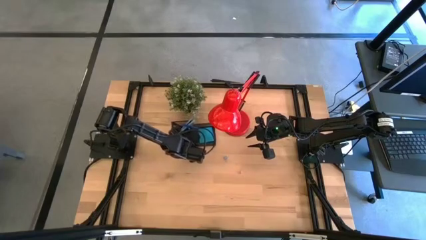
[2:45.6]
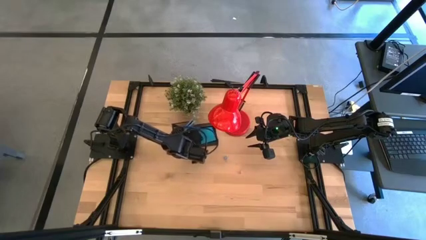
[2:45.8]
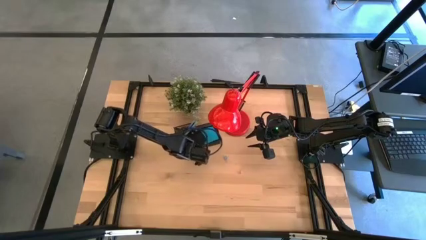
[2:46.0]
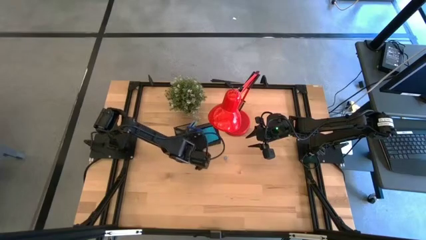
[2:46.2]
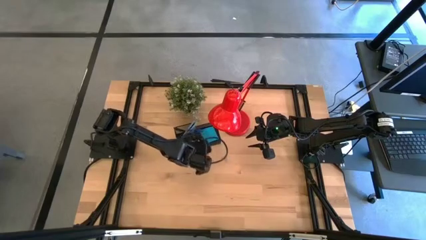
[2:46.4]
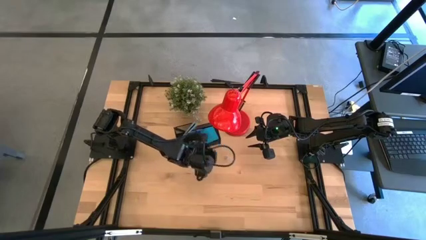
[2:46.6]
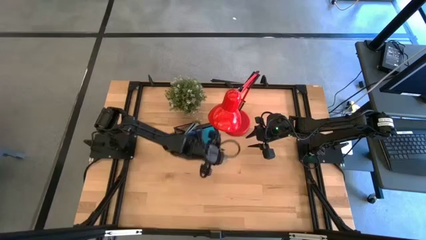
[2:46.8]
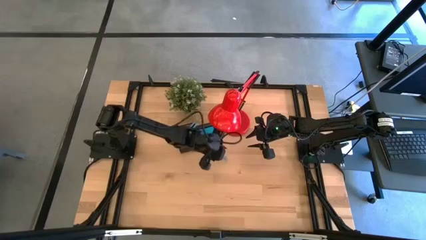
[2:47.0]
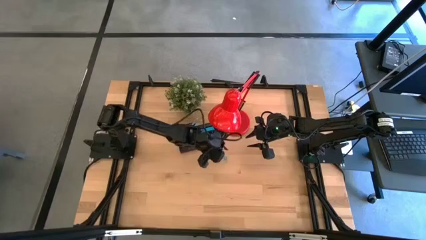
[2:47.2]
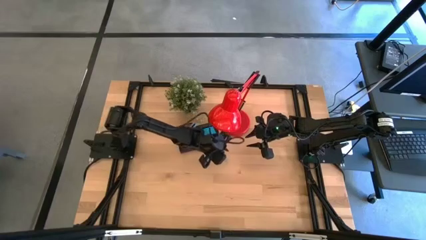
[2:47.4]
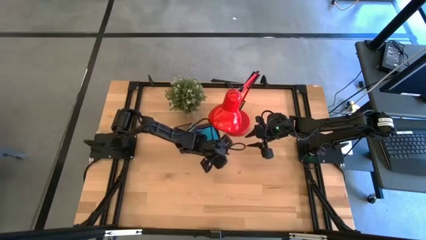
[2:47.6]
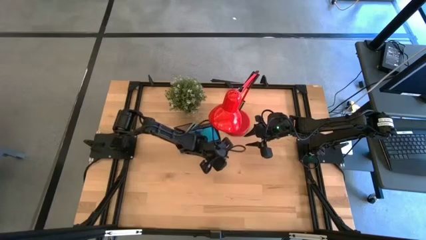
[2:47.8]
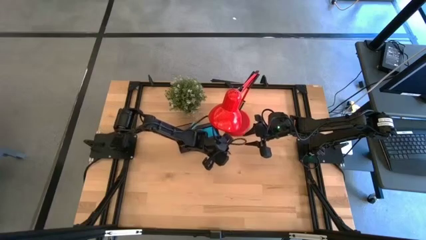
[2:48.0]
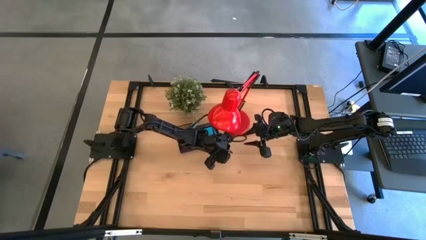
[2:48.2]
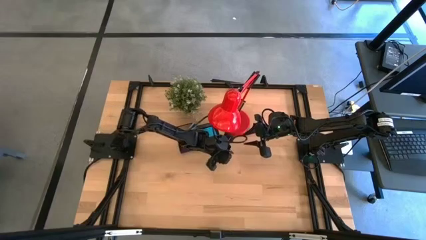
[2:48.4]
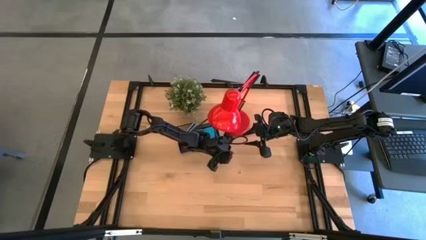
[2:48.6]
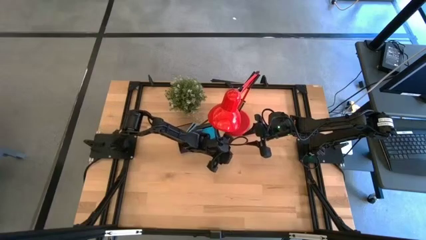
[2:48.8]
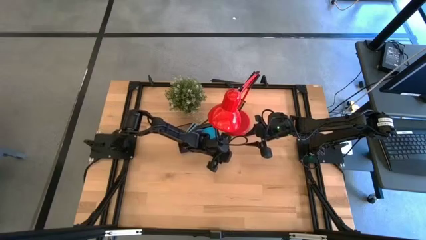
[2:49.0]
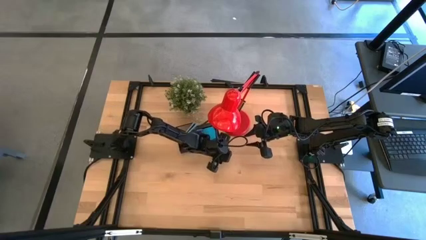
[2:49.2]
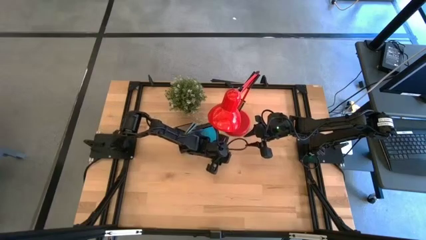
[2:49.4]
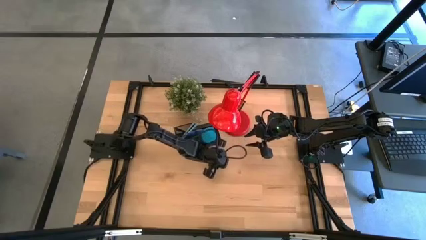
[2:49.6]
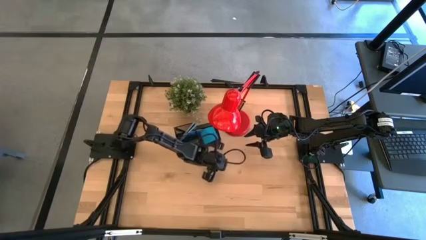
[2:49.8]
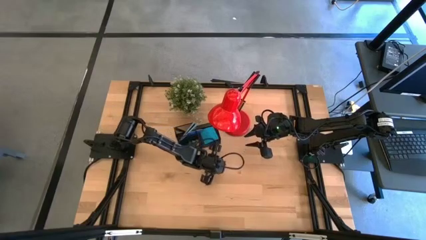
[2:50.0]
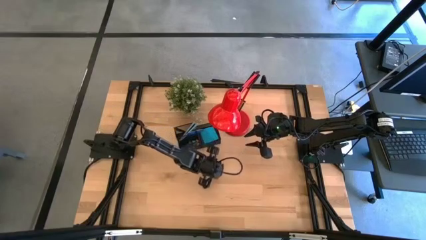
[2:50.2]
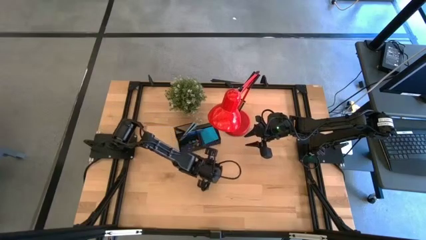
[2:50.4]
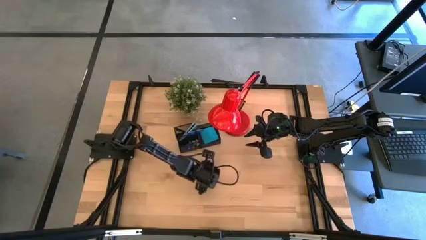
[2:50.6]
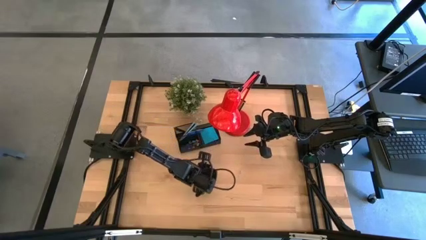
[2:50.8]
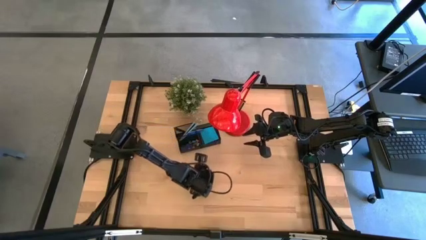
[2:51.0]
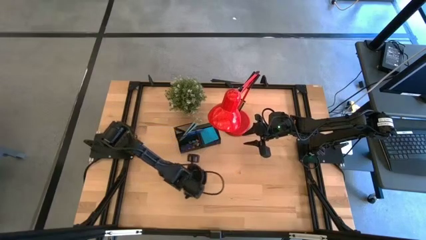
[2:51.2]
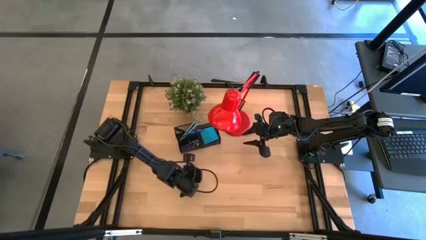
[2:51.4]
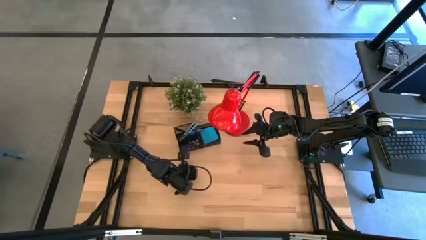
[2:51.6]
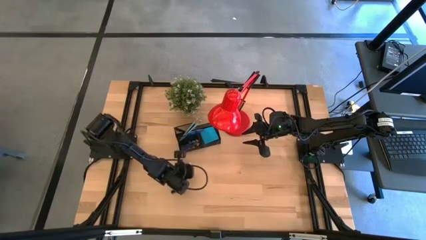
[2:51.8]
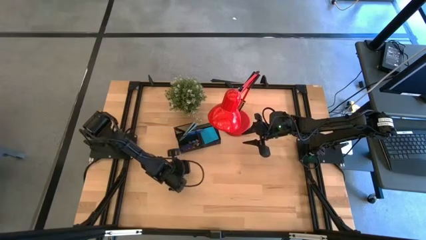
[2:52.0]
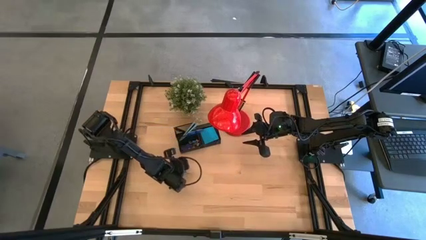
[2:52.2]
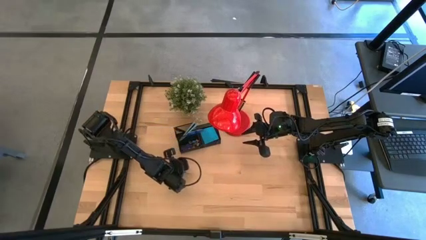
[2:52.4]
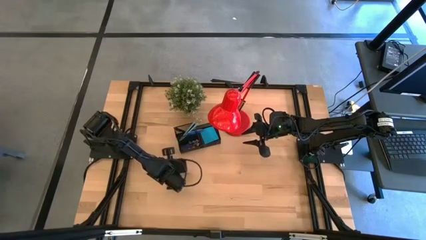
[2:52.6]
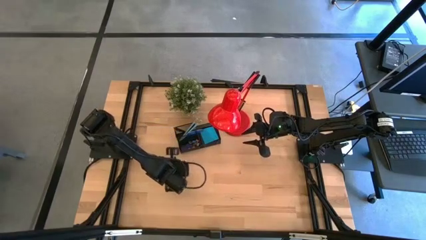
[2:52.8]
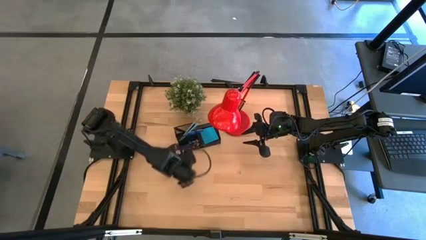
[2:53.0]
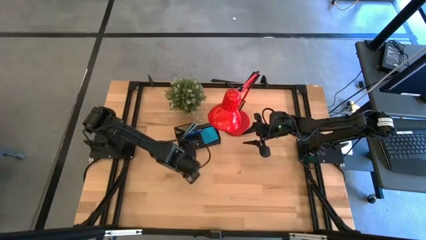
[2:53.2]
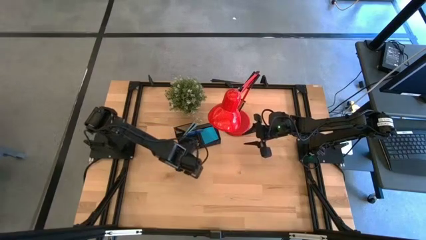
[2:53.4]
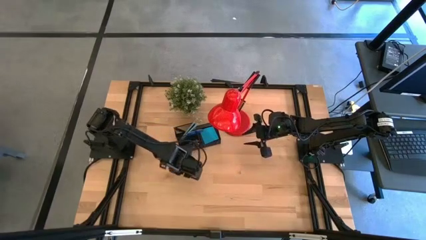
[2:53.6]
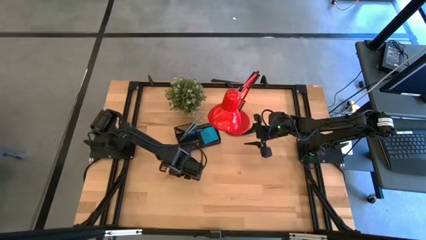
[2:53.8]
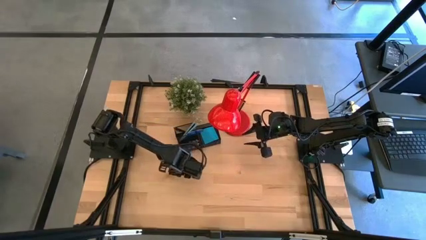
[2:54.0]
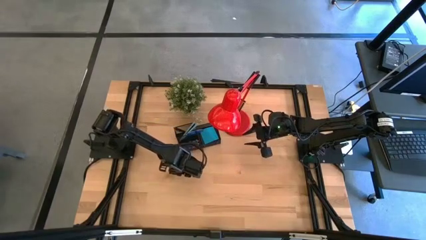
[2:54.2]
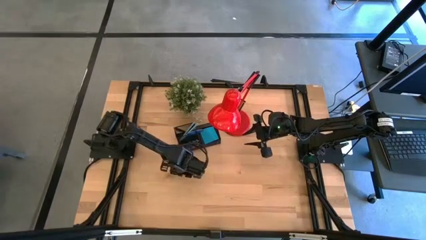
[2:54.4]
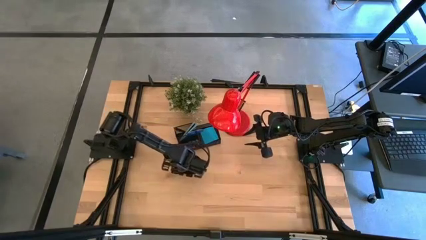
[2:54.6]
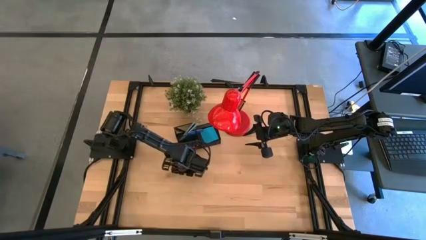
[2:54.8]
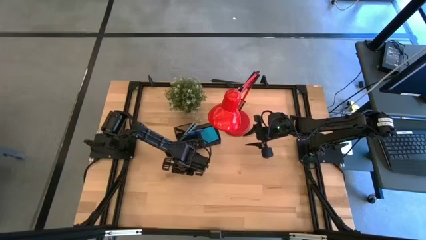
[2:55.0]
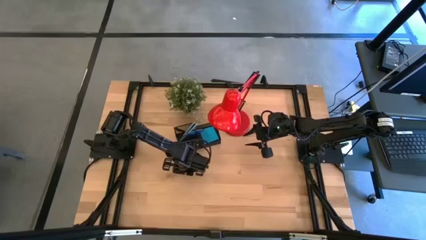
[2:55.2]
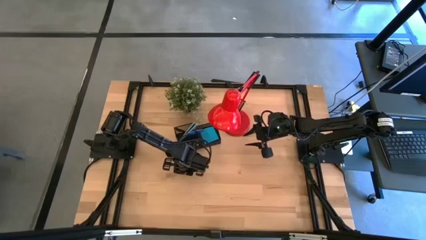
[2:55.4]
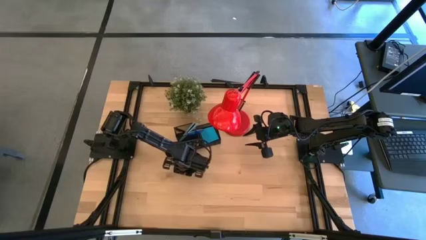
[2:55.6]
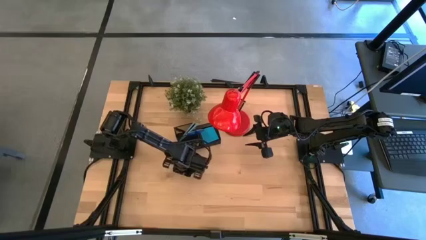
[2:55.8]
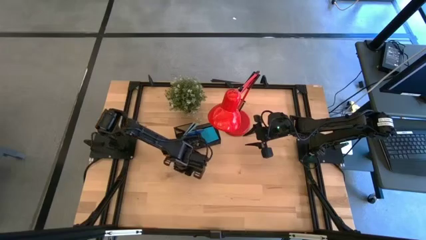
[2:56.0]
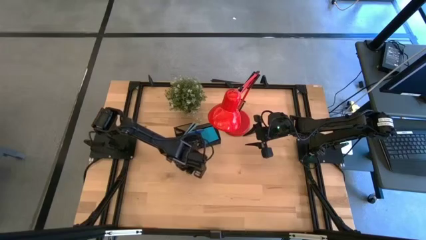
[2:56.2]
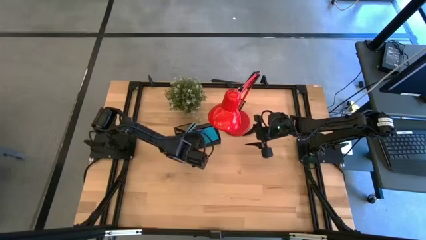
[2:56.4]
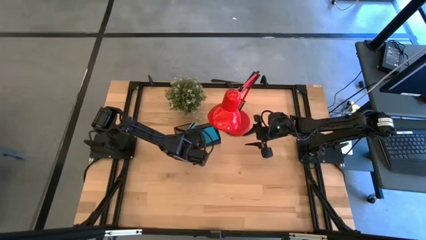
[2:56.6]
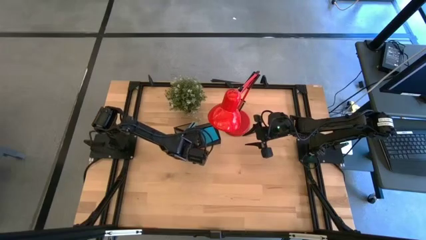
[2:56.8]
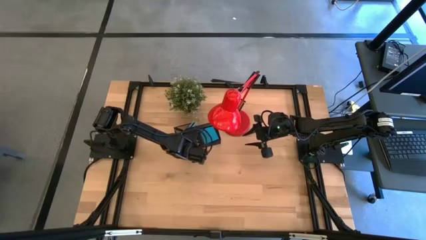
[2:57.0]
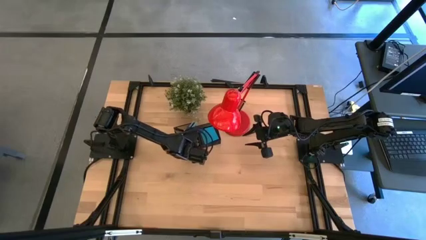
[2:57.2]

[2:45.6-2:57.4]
Task: Pick and place office supplies into organizer
Put the blue binder clip into the black desk organizer

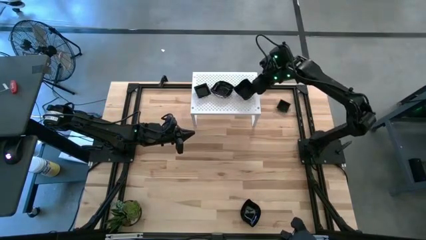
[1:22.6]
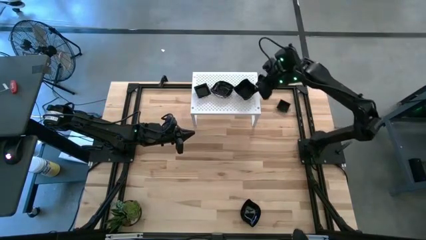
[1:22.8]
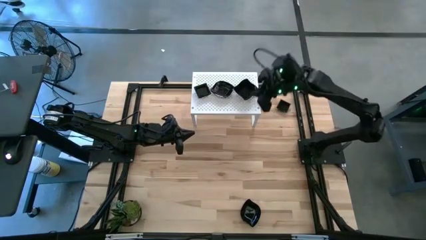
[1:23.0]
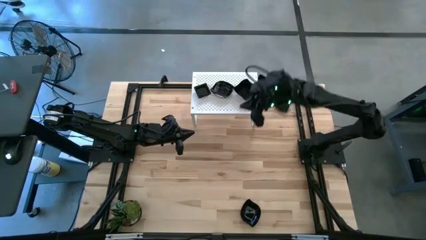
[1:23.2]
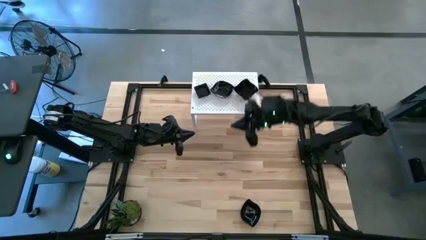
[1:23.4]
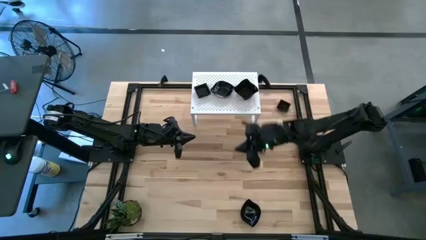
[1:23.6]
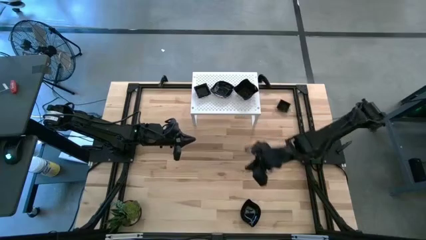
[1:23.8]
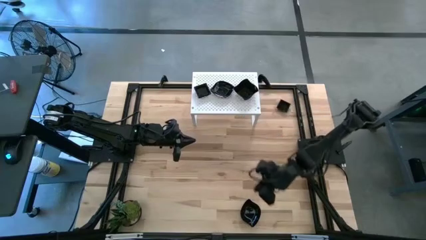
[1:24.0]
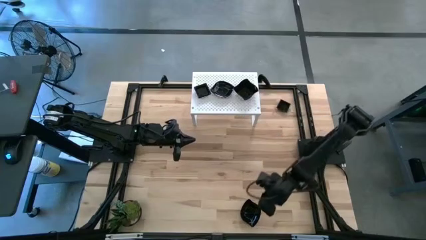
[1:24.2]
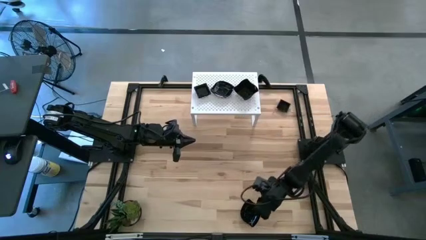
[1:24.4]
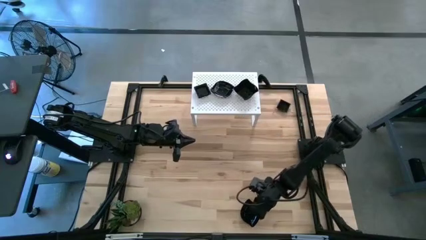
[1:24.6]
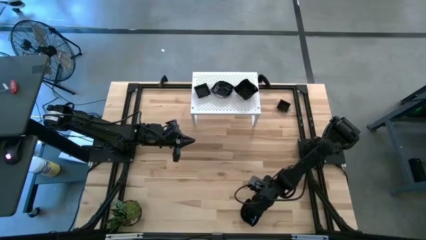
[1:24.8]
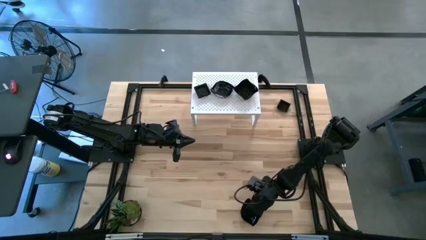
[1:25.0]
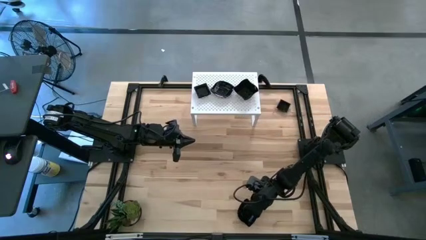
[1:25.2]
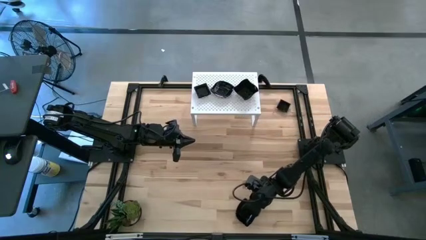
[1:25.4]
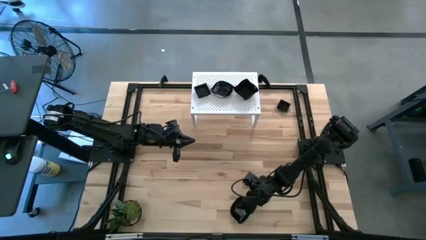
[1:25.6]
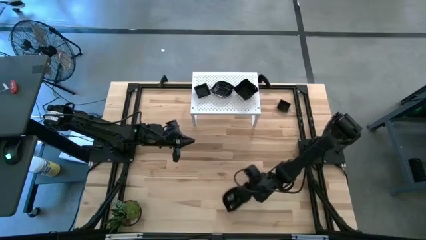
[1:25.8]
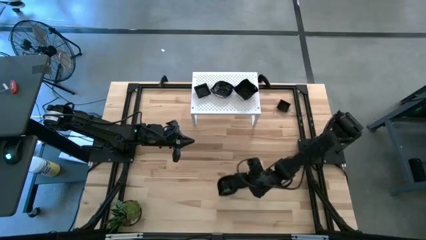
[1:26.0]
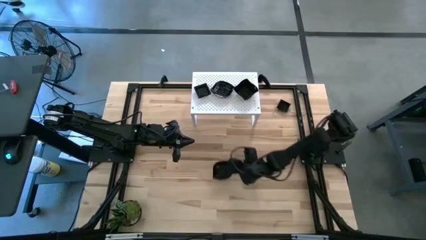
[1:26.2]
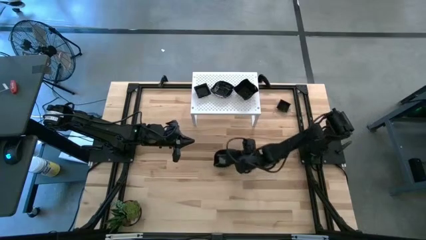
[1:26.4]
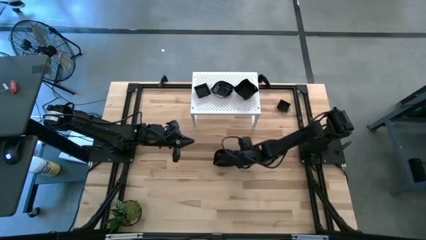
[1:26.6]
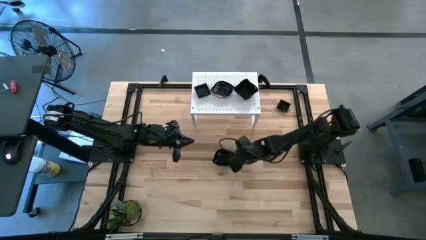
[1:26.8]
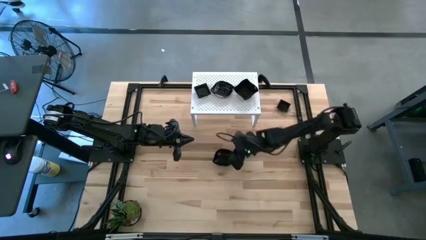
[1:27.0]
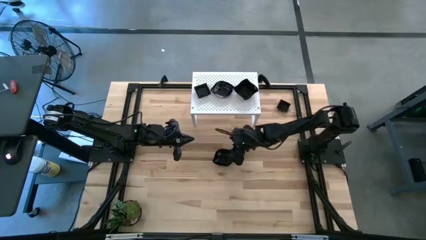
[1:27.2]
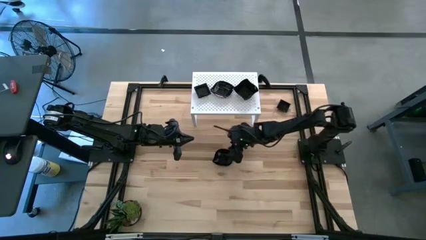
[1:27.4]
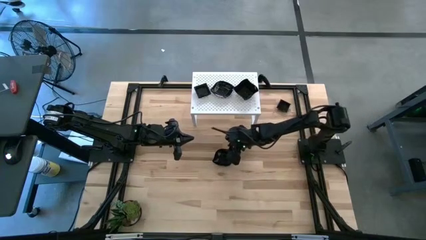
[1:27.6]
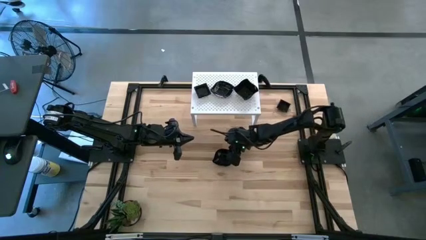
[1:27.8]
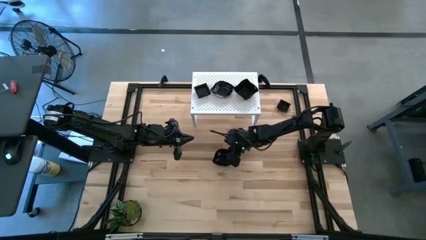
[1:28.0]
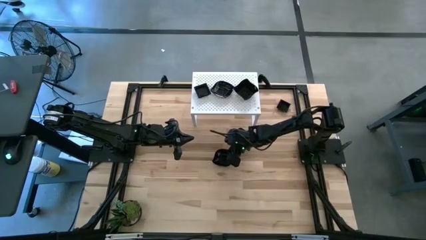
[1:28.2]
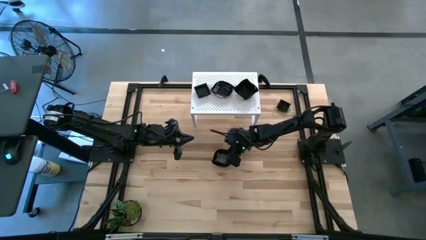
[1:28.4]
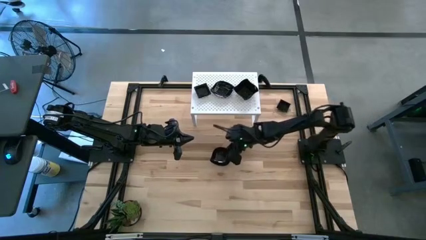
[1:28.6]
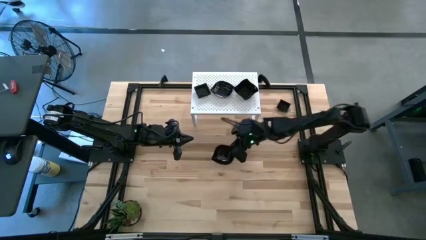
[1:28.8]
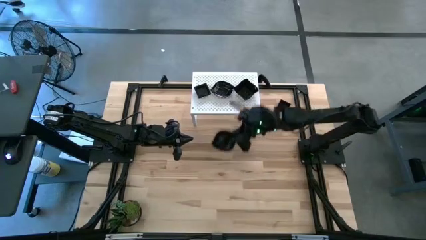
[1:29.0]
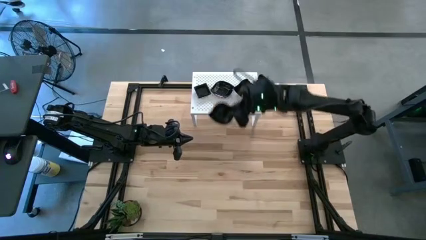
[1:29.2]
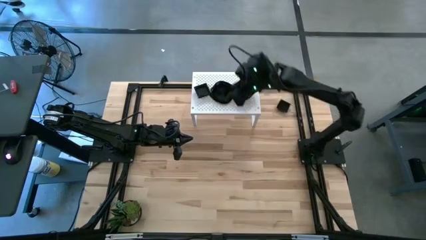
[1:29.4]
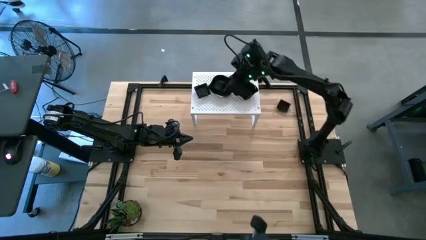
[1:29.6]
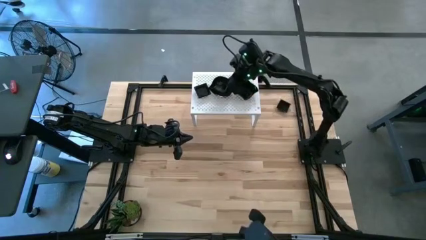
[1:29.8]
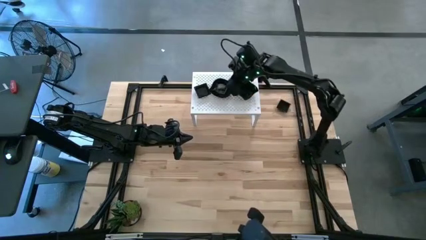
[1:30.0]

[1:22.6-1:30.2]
Task: Pick & Place Mini shaped plates
Stack the black leaf-shaped plate on top of the black leaf-shaped plates on the shelf
